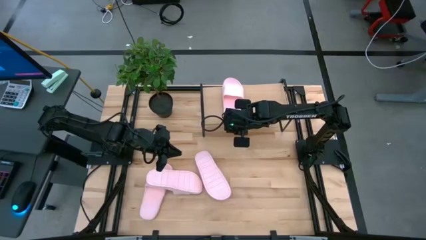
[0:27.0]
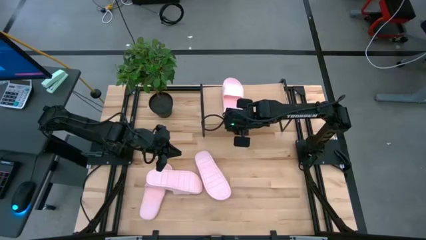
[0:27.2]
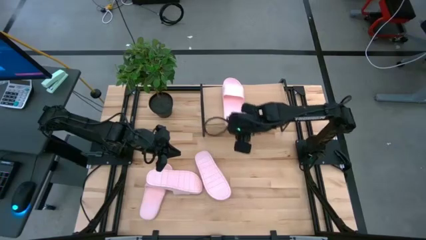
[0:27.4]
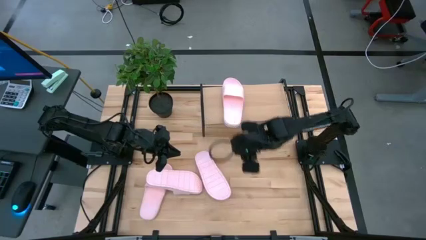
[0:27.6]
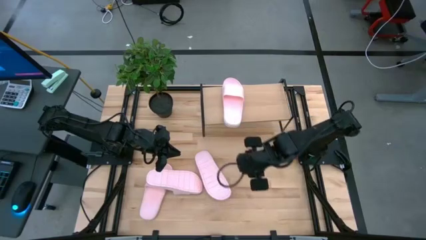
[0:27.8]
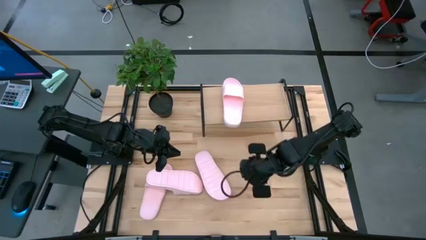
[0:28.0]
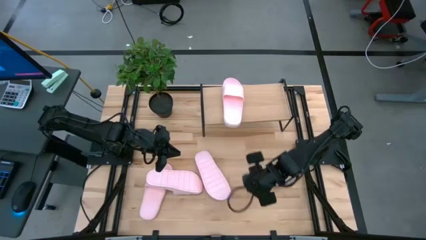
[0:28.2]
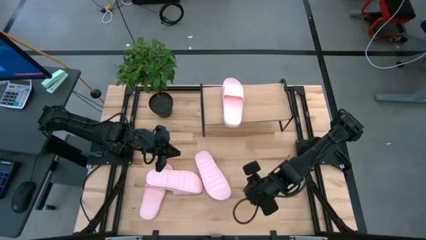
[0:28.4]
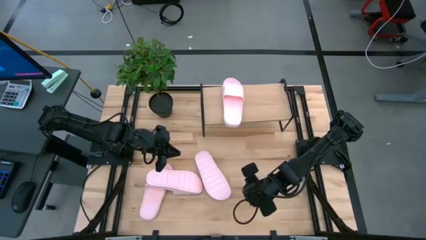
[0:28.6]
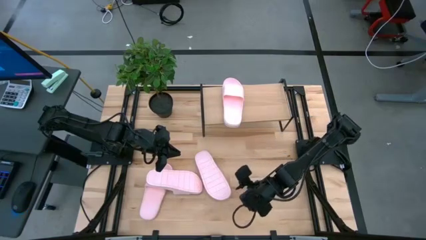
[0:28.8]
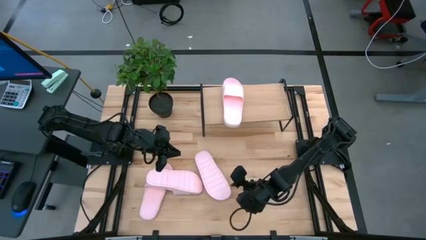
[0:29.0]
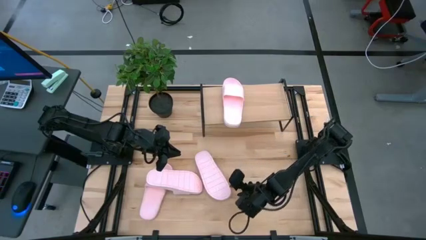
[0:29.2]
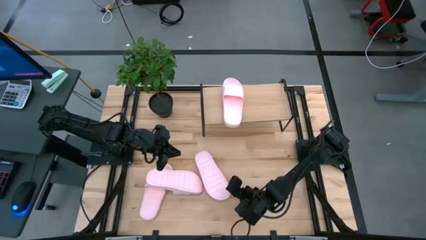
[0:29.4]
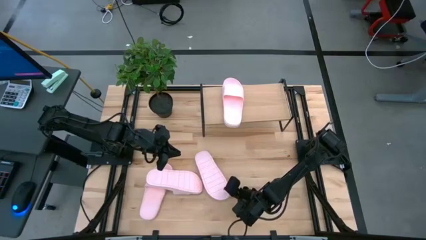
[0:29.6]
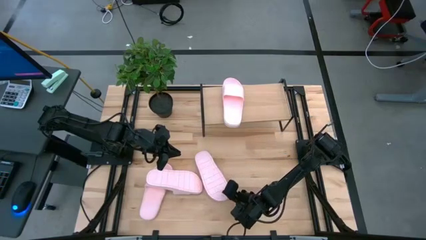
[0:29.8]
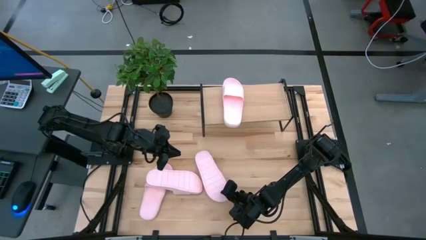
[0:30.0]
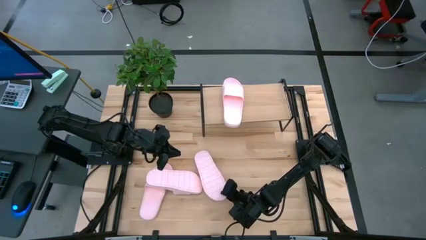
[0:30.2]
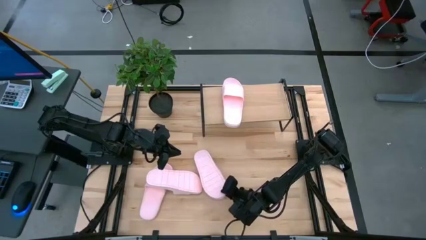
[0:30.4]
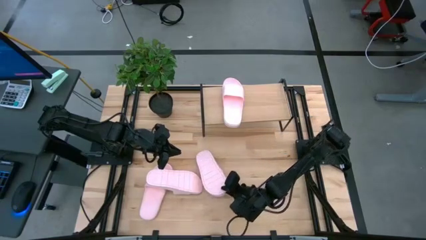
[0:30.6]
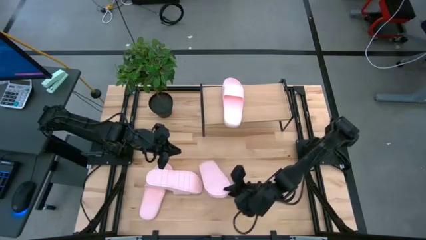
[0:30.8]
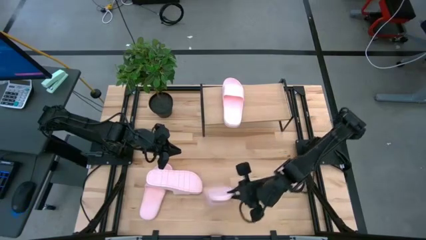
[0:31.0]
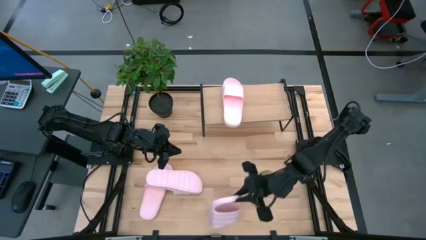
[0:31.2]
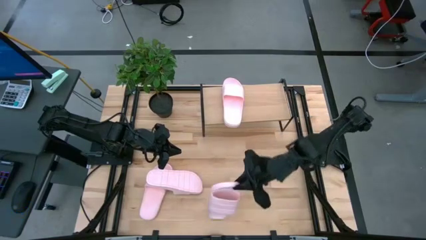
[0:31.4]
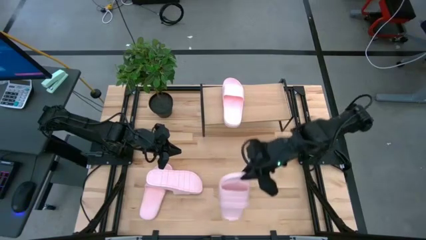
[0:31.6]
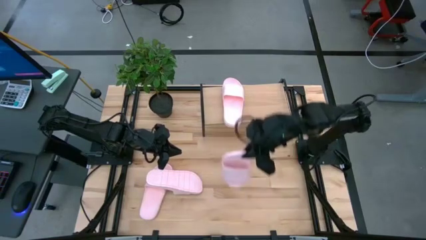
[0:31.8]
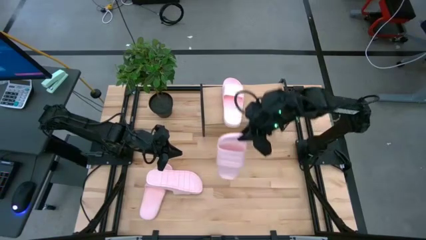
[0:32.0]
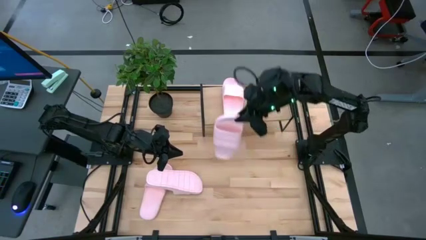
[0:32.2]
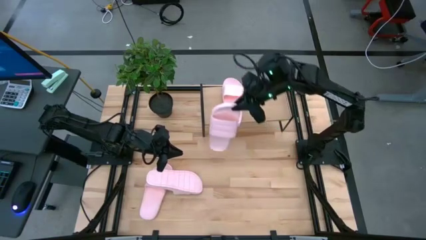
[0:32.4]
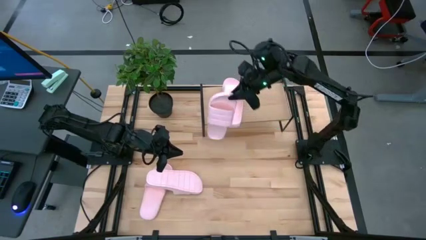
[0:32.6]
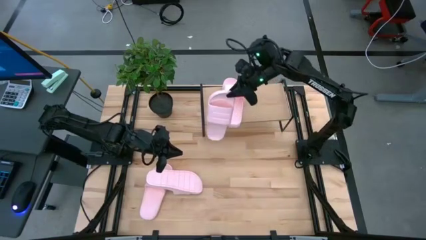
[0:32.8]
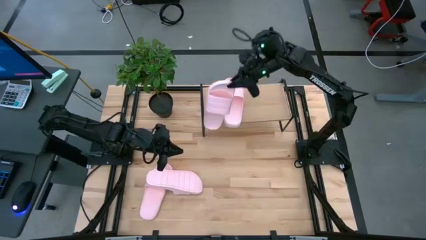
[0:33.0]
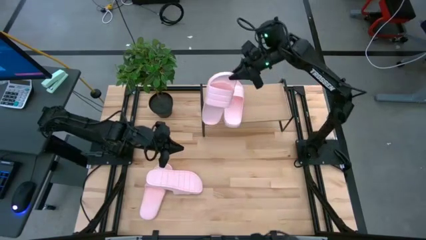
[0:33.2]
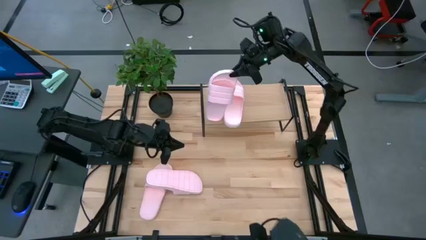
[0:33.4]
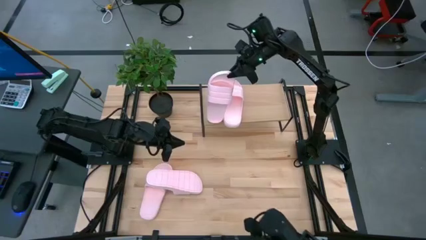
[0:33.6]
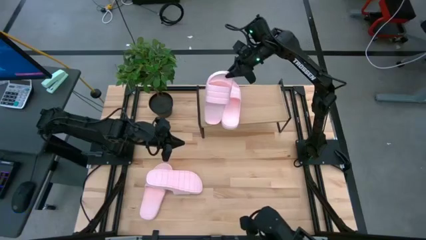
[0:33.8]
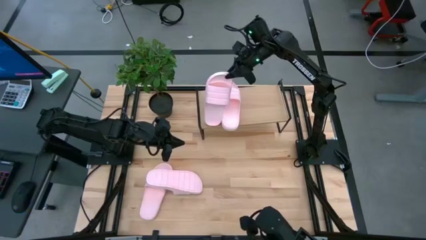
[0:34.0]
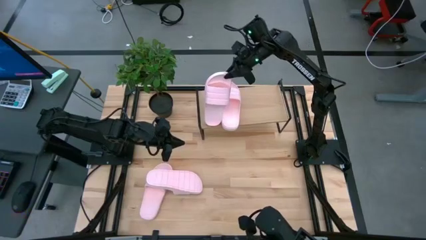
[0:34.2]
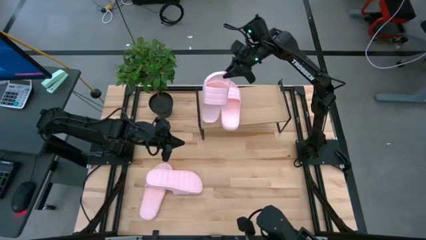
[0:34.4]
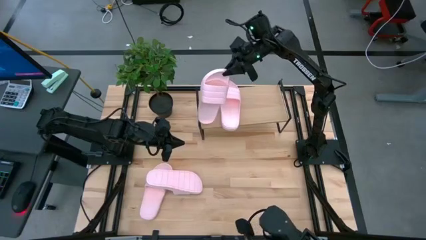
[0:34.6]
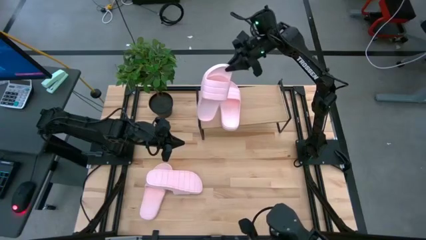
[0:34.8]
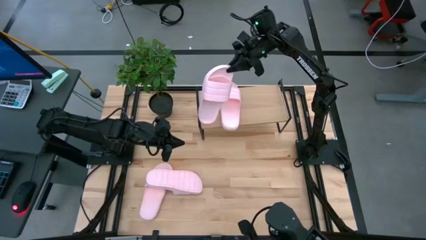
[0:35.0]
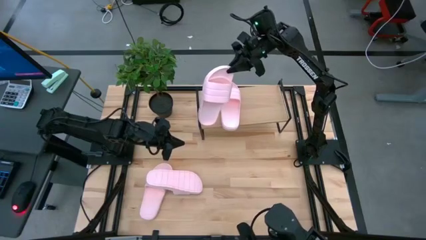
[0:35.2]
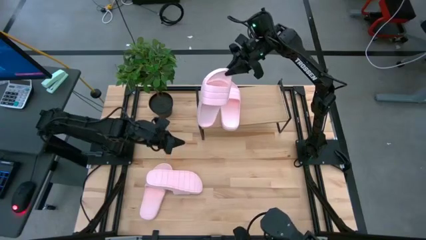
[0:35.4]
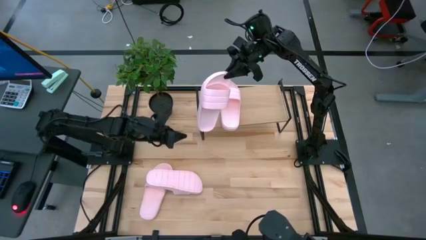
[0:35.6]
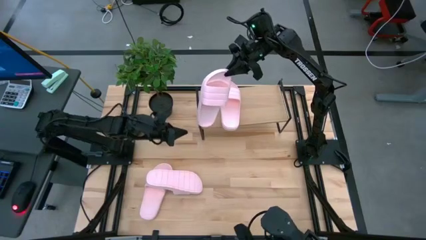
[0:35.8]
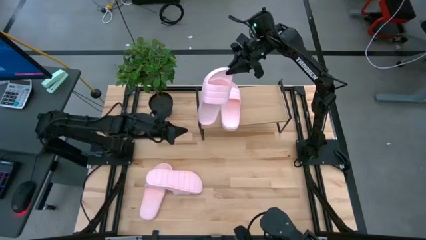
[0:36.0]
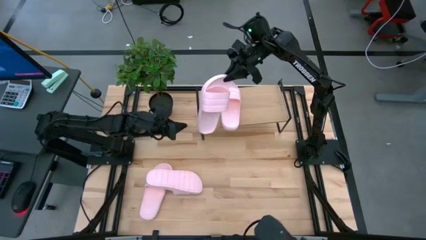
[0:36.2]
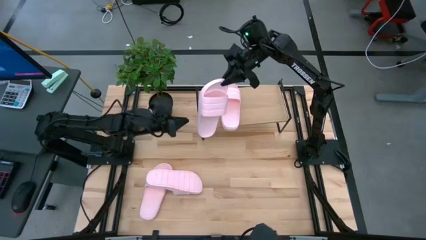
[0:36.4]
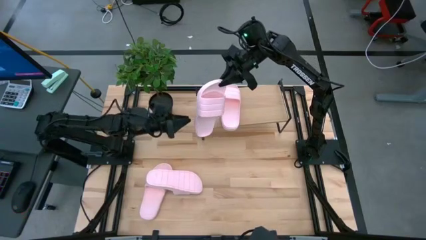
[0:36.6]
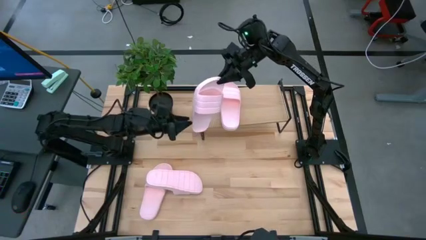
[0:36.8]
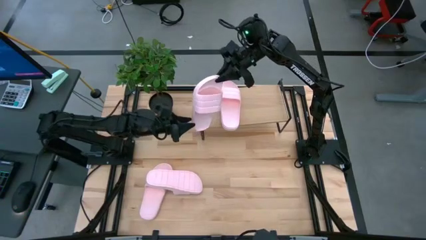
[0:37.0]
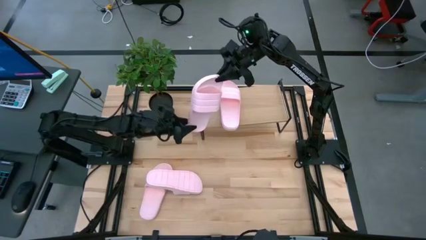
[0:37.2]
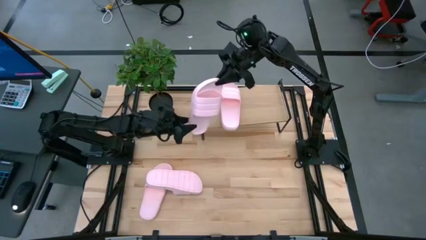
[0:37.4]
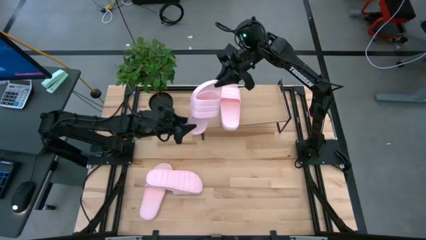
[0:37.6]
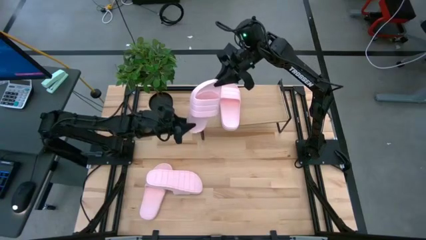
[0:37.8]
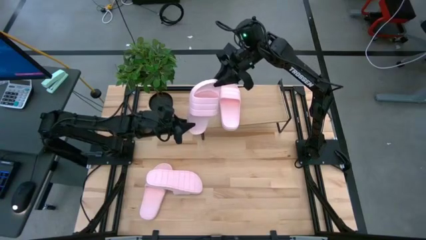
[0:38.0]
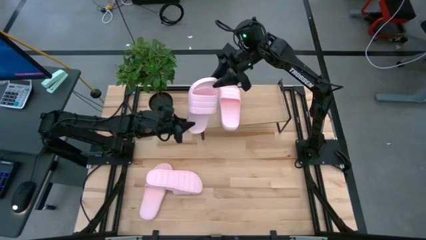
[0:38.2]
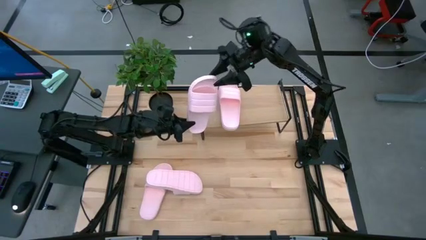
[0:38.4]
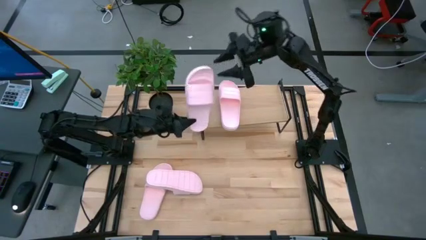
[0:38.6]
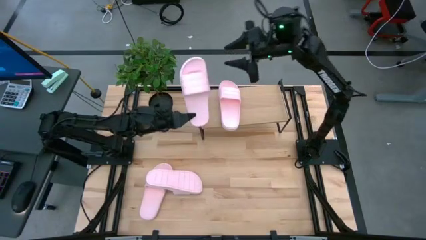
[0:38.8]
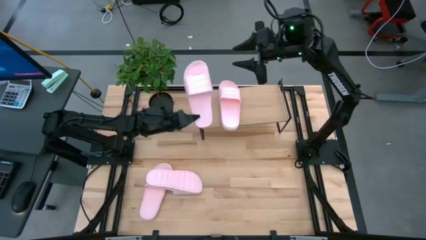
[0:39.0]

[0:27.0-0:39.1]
Task: Pick and place slides into the shelf
Put the right pink slide on the shelf
